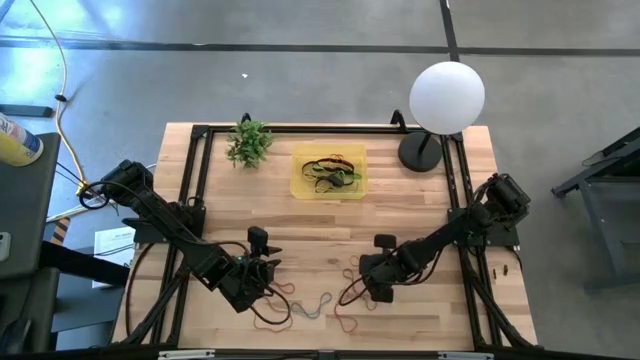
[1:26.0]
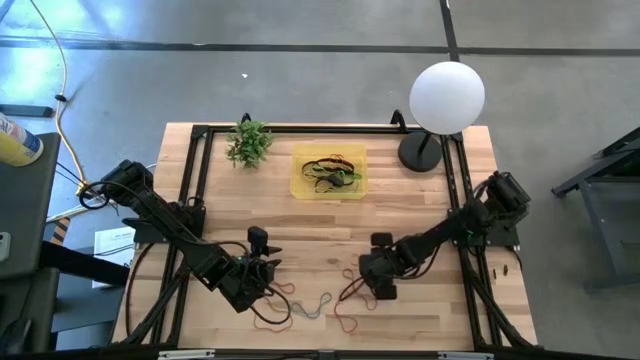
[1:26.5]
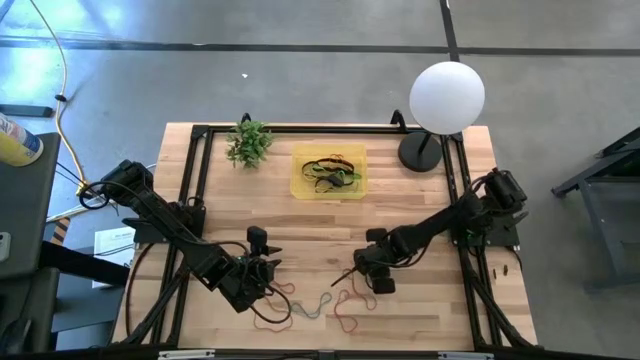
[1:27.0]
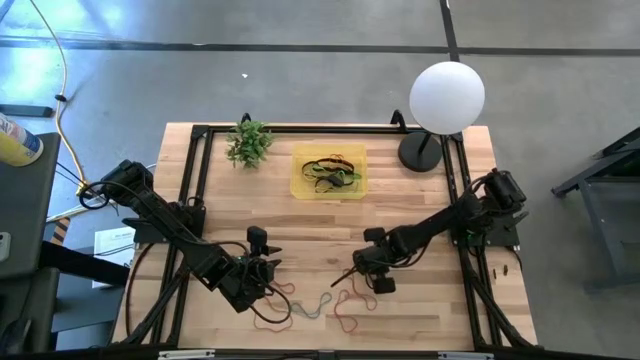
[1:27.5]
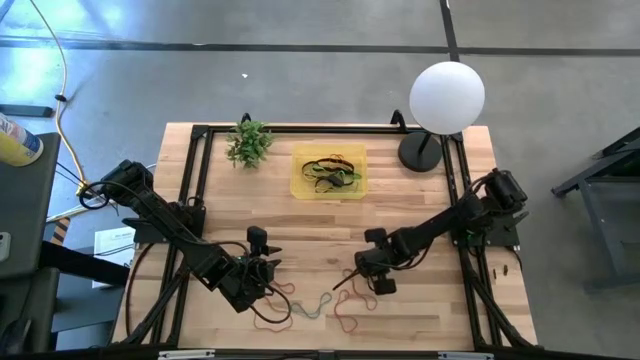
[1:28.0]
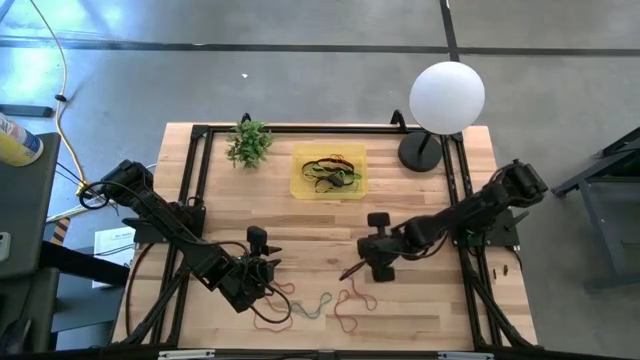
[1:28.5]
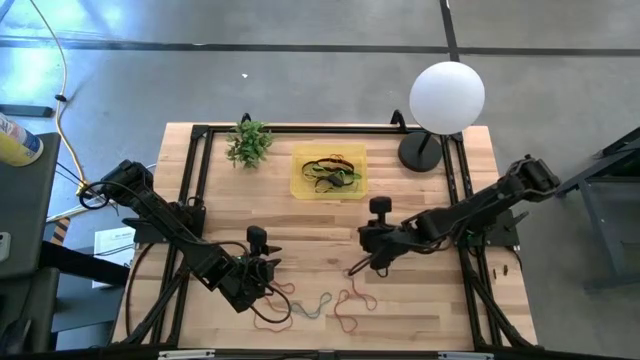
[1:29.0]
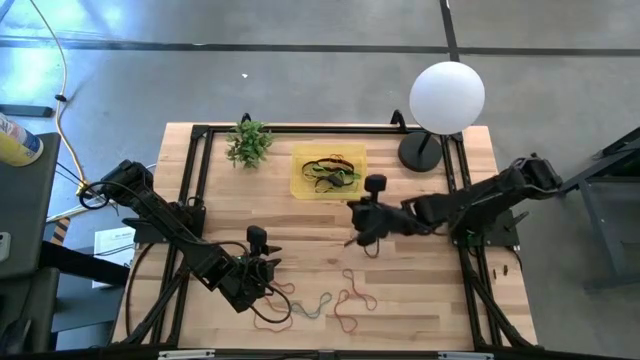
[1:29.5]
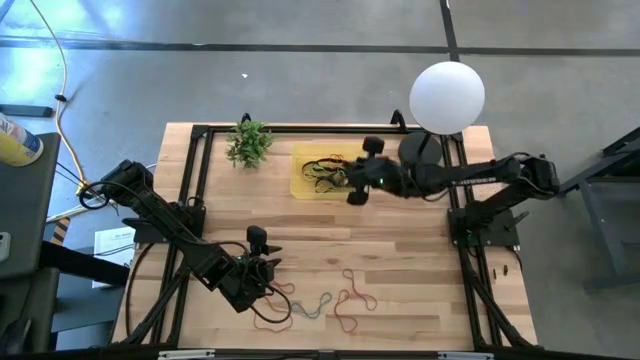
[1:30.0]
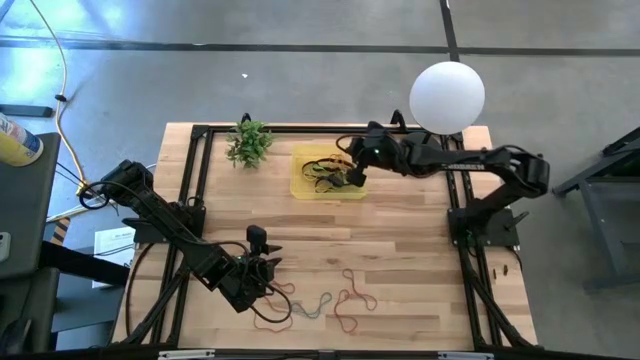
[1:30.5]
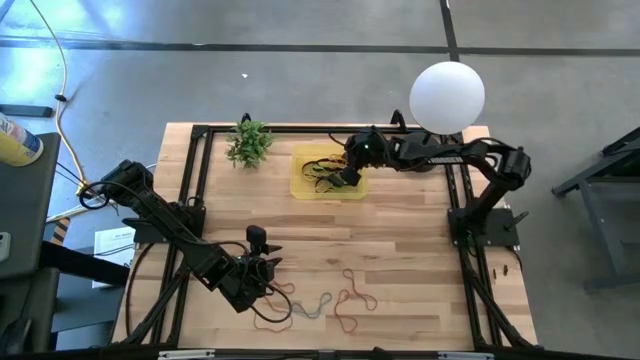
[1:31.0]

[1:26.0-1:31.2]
Task: Pick and place rubber bands into bin
Put the yellow rubber band into the yellow bin

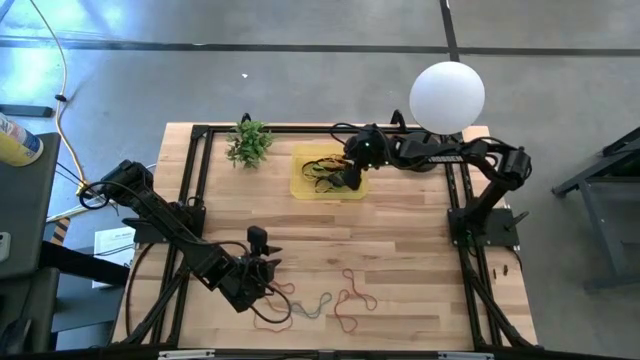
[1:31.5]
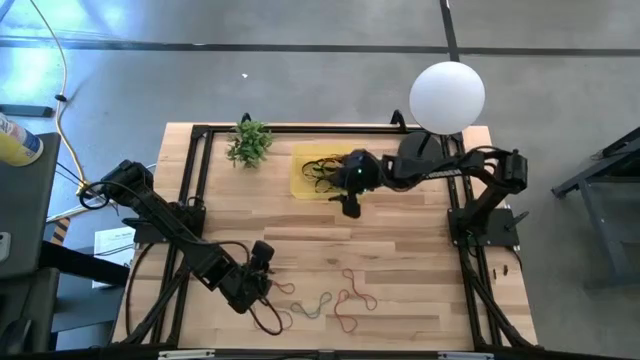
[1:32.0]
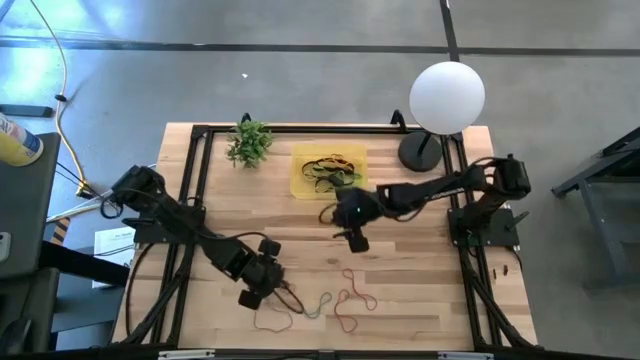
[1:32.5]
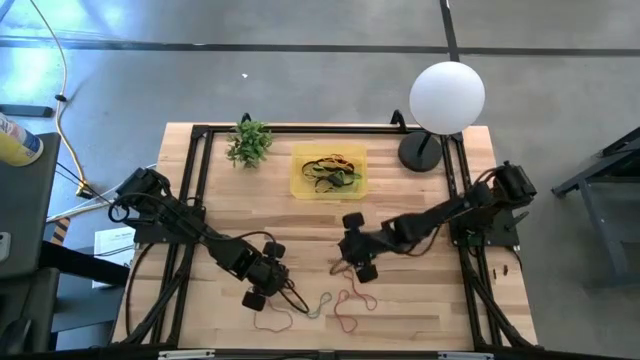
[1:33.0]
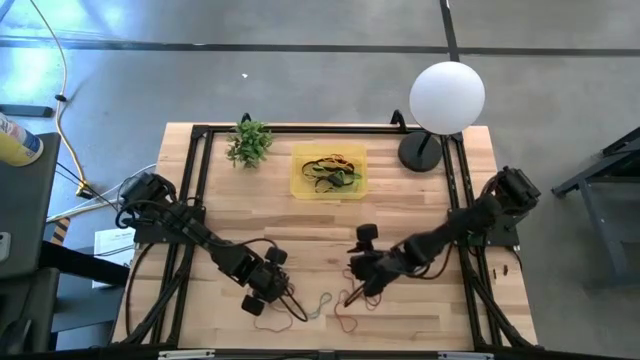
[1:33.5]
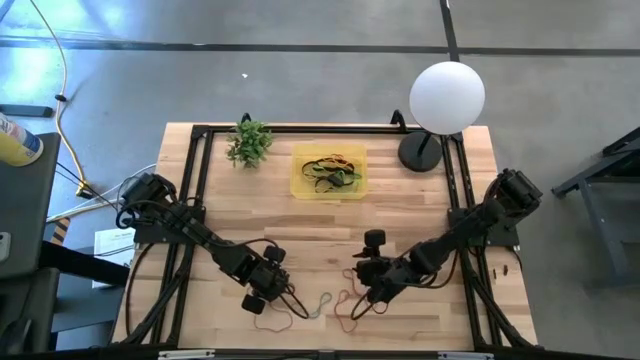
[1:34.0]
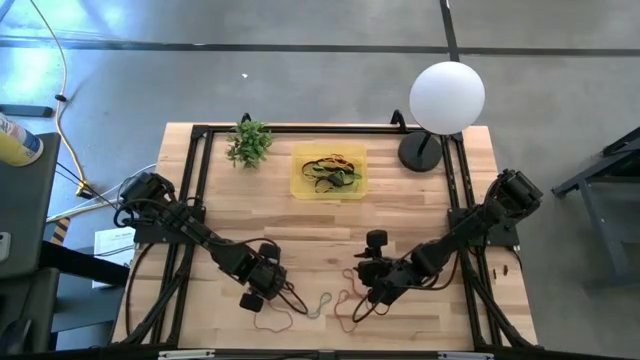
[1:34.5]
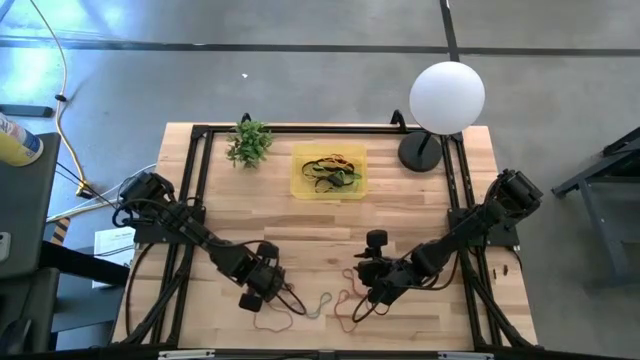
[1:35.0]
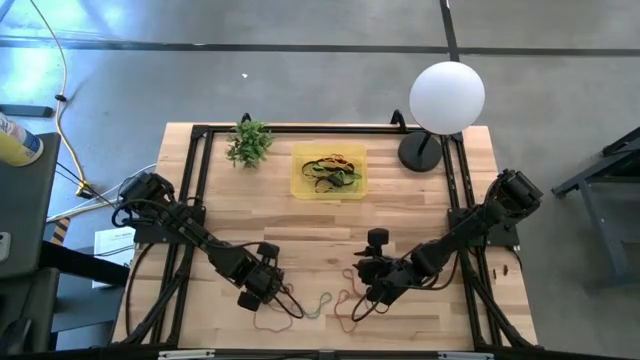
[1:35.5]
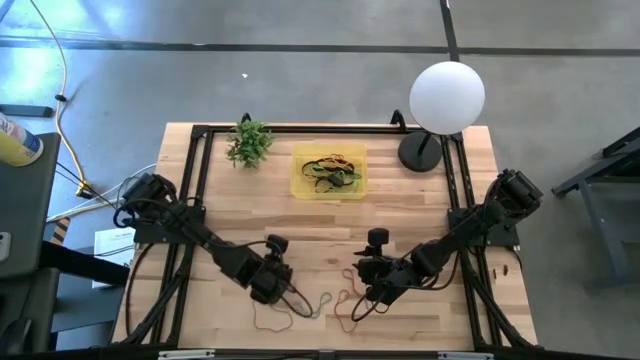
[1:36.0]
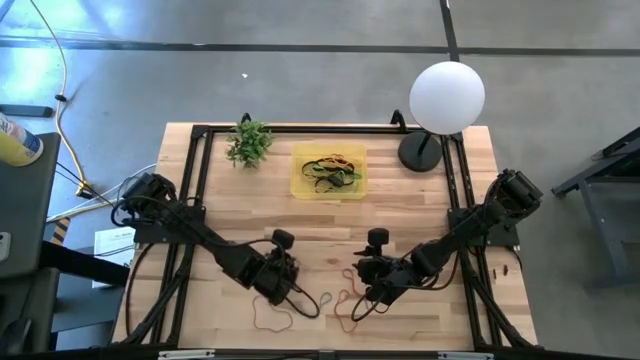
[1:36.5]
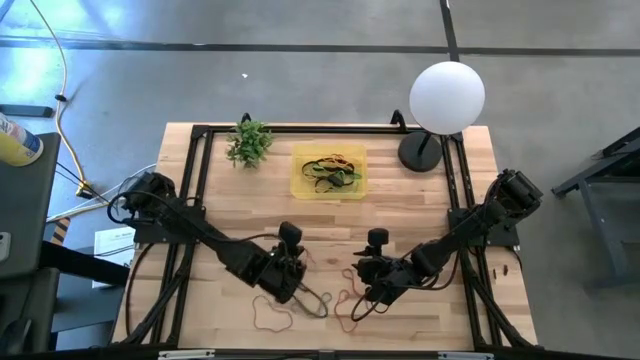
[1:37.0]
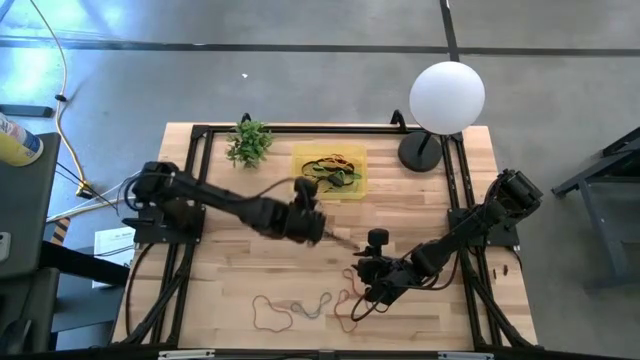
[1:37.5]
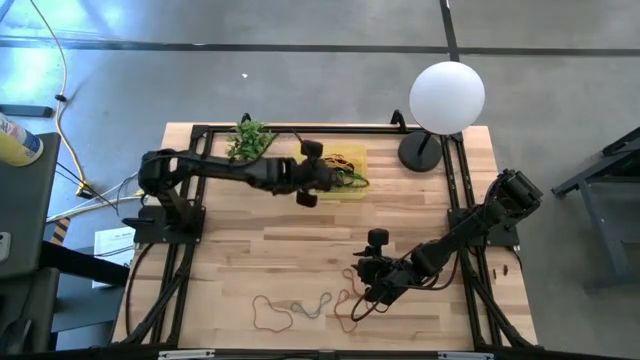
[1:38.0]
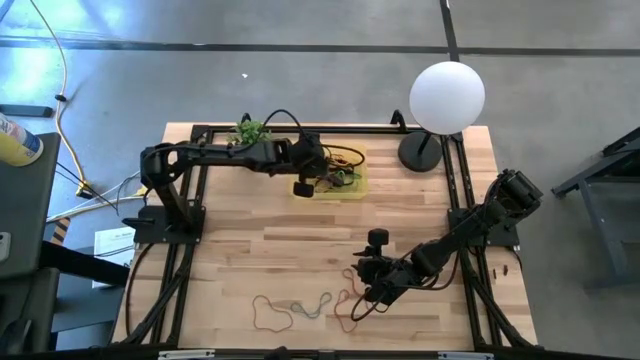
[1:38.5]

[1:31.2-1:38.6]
Put the red rubber band into the yellow bin

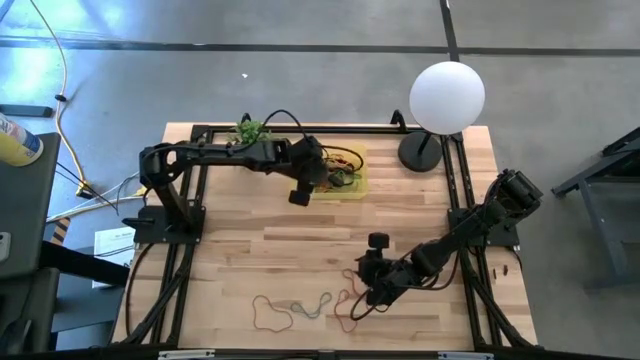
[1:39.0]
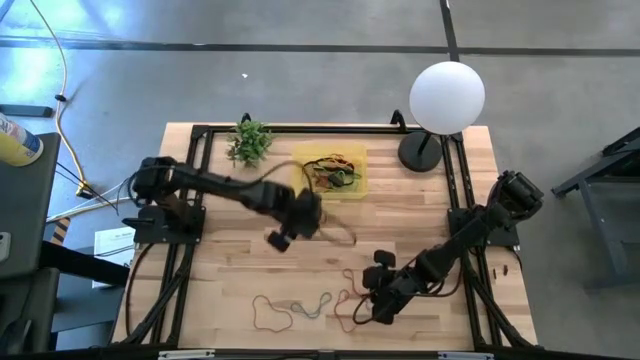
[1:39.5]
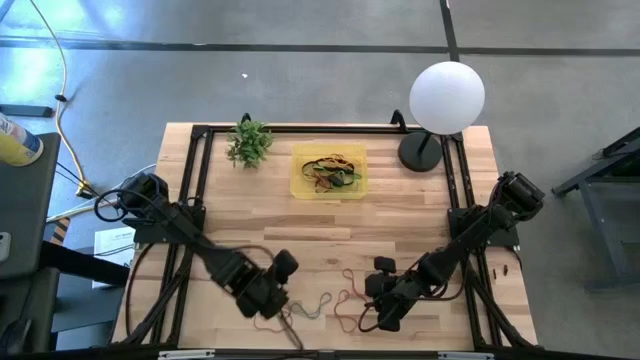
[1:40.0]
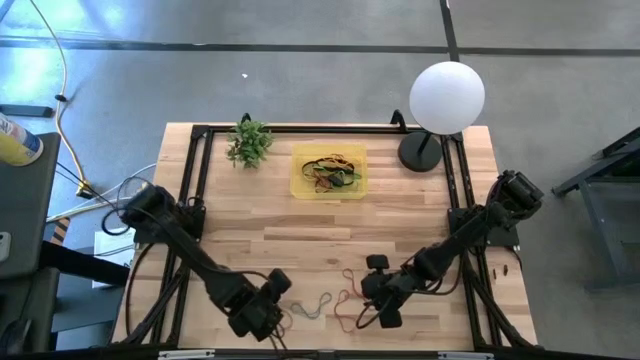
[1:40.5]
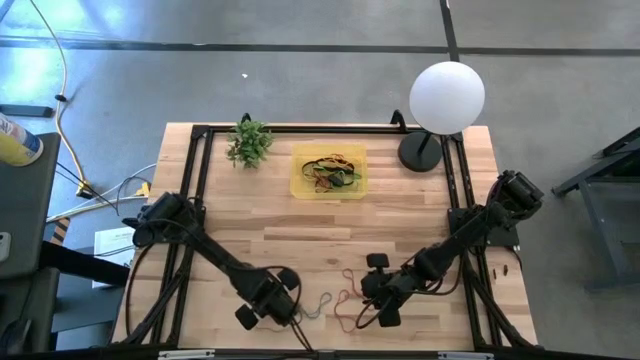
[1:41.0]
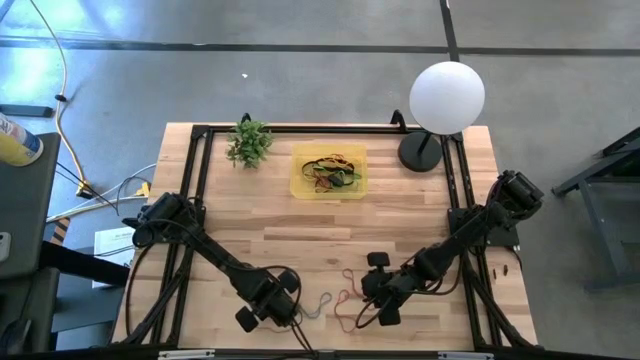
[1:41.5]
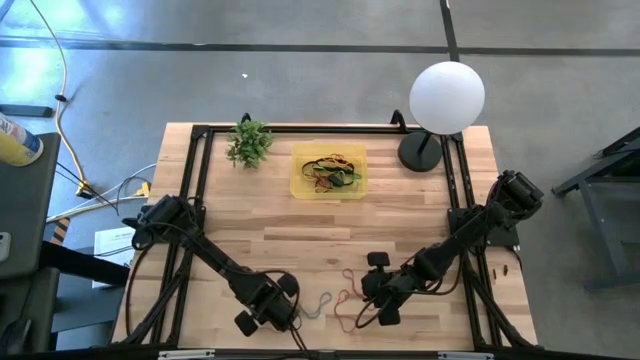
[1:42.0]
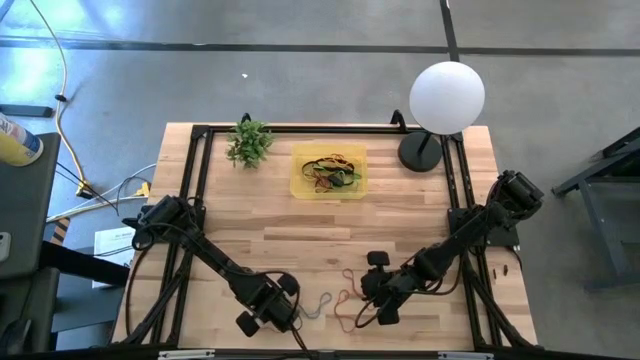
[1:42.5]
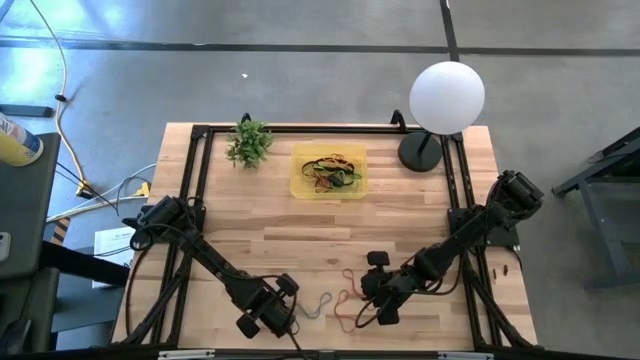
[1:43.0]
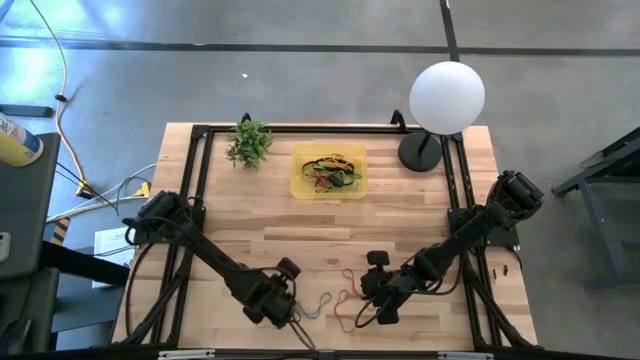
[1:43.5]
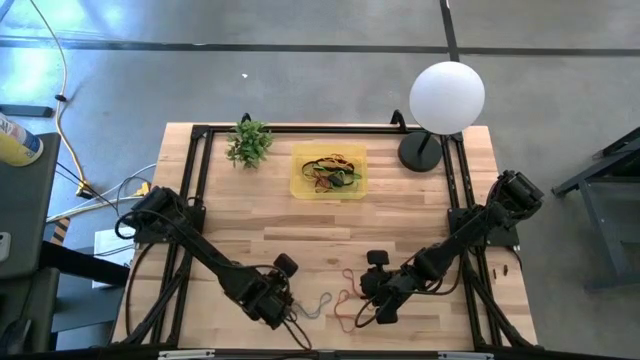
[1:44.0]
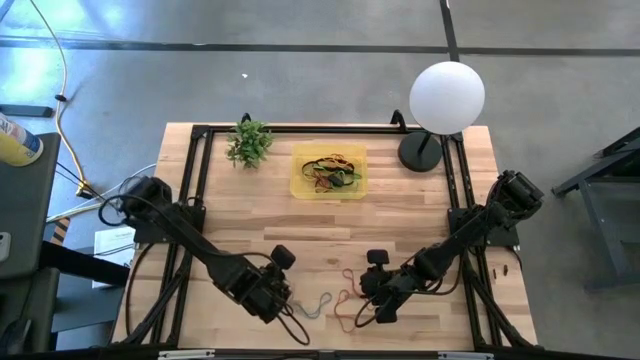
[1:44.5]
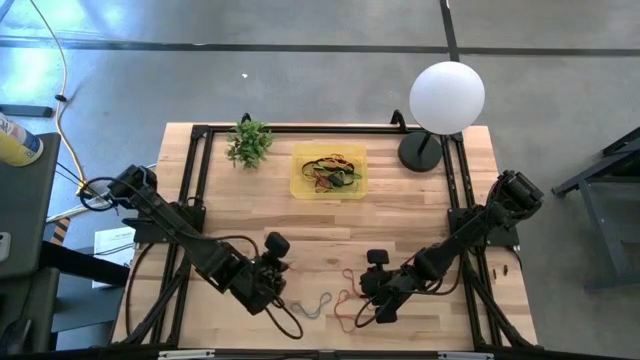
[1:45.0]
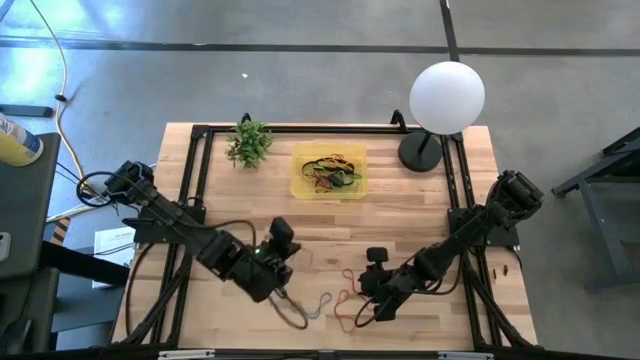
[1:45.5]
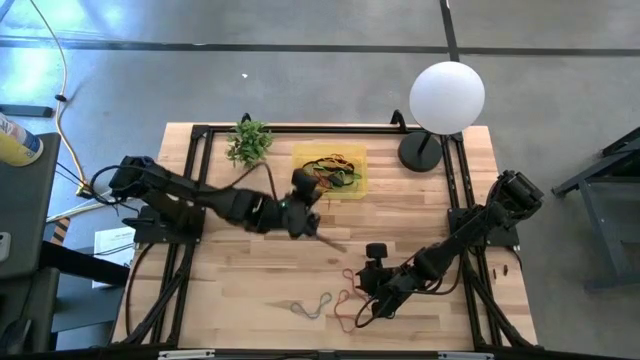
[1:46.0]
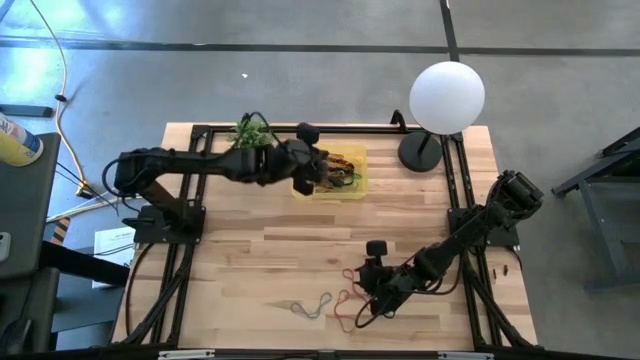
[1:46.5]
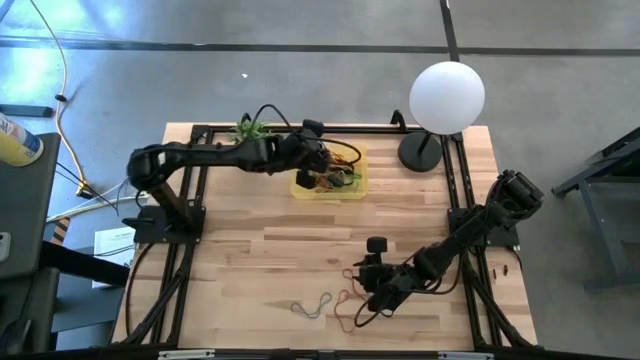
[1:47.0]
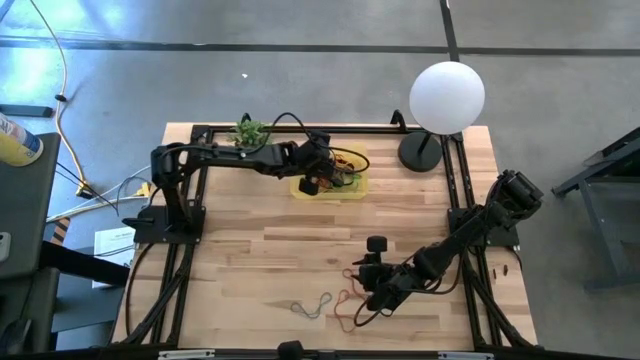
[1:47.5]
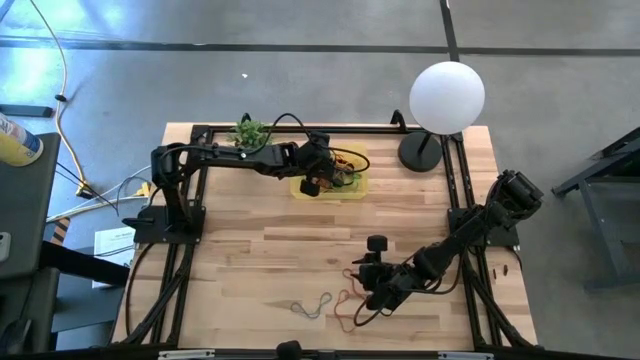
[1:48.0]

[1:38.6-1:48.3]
Put the bottom left red rubber band into the yellow bin
